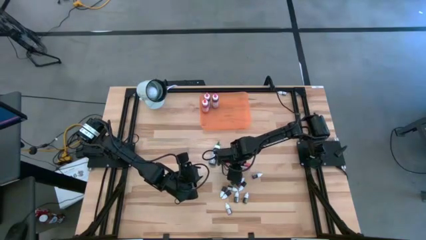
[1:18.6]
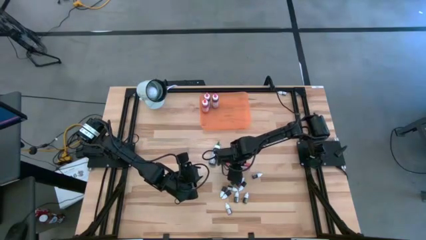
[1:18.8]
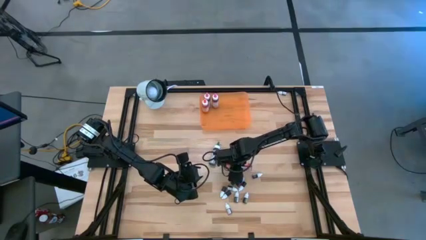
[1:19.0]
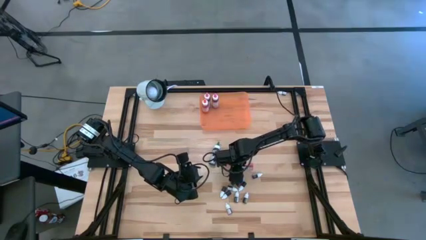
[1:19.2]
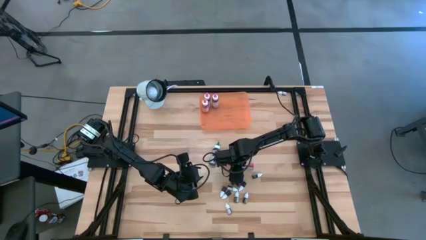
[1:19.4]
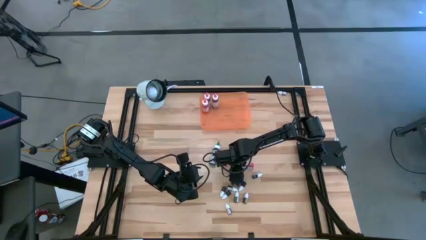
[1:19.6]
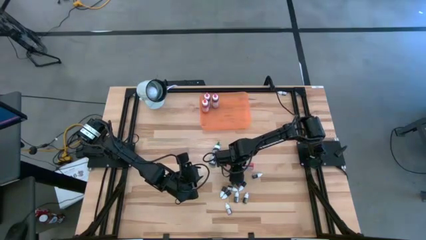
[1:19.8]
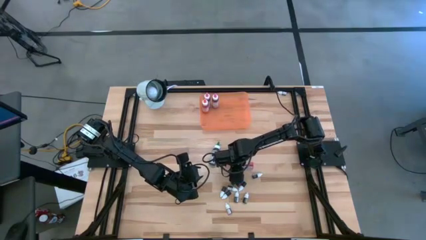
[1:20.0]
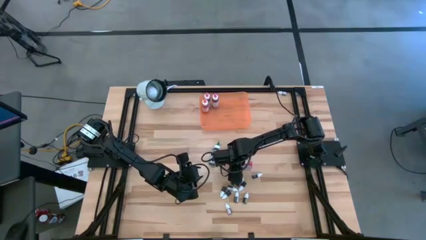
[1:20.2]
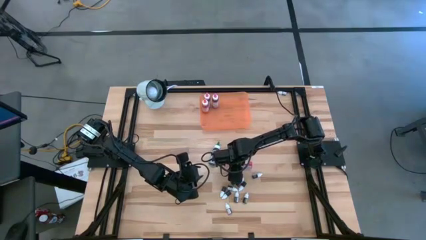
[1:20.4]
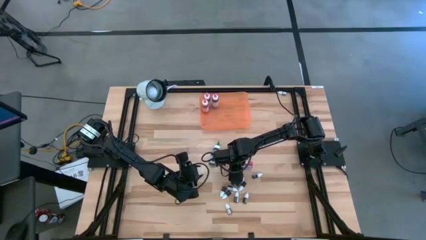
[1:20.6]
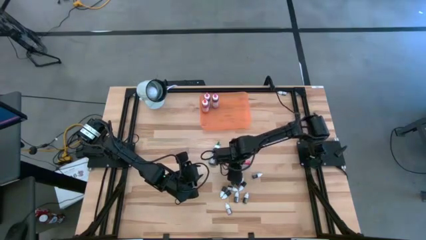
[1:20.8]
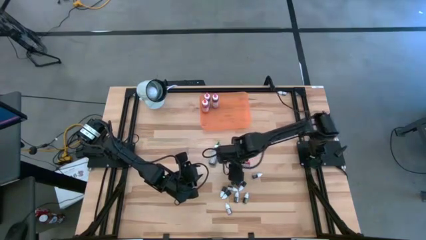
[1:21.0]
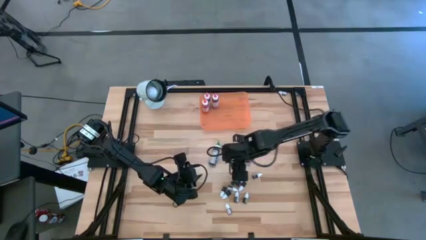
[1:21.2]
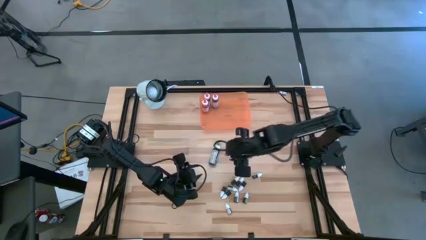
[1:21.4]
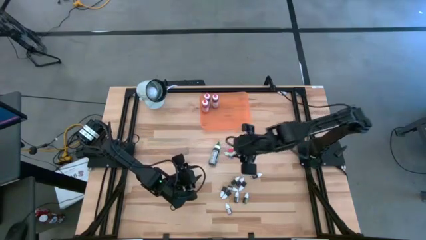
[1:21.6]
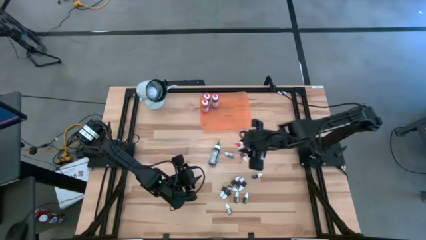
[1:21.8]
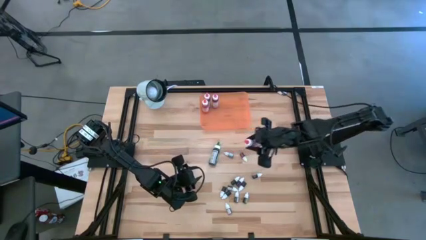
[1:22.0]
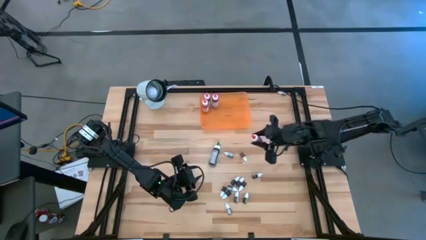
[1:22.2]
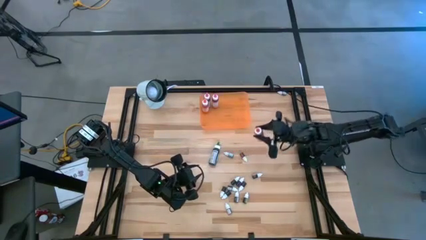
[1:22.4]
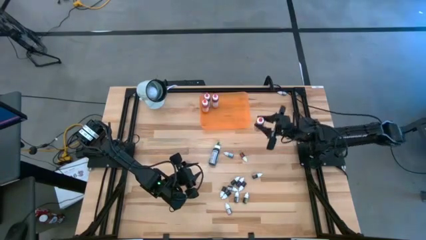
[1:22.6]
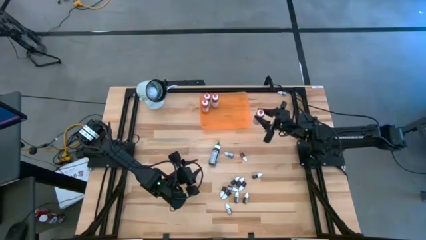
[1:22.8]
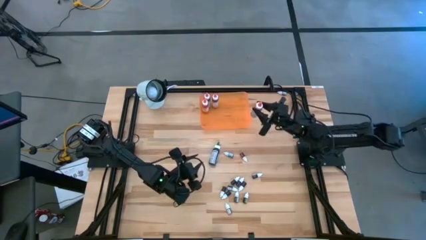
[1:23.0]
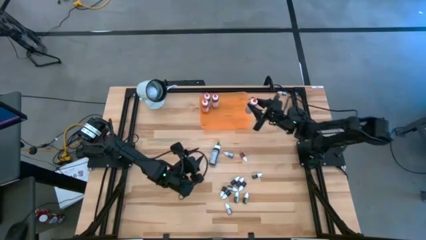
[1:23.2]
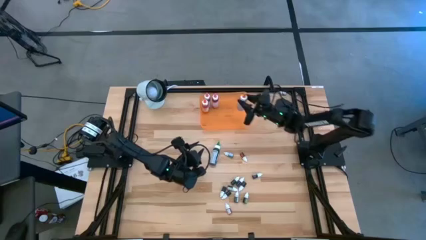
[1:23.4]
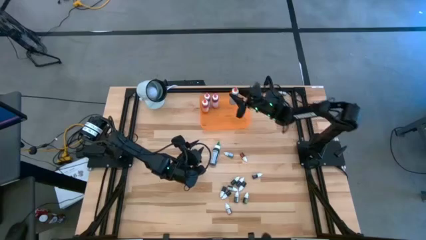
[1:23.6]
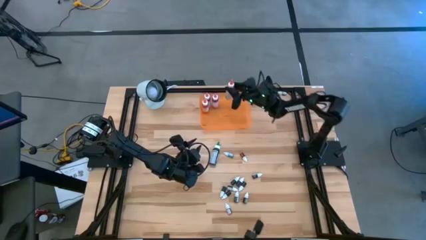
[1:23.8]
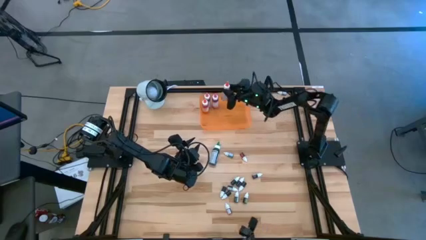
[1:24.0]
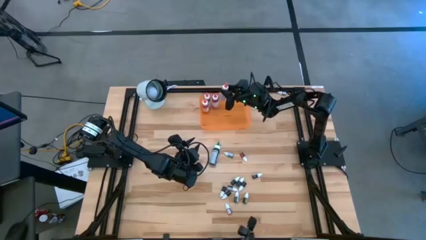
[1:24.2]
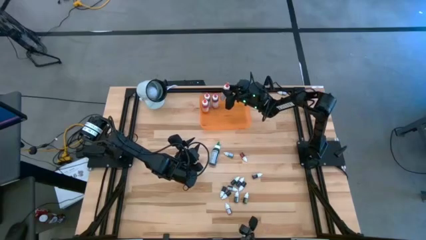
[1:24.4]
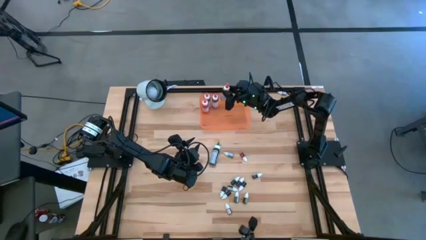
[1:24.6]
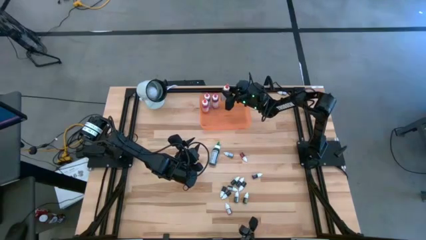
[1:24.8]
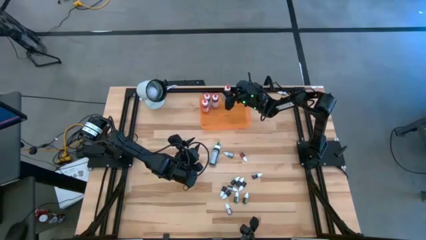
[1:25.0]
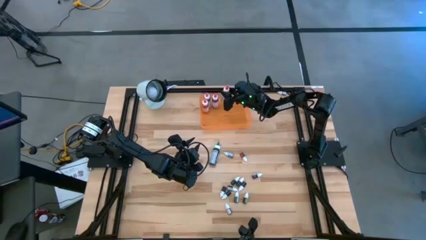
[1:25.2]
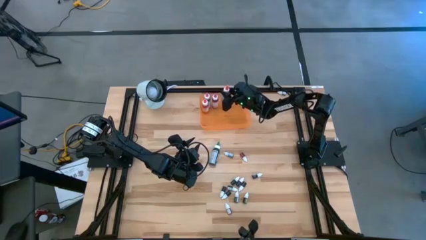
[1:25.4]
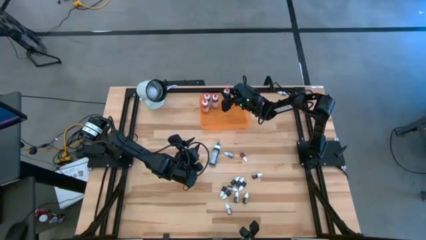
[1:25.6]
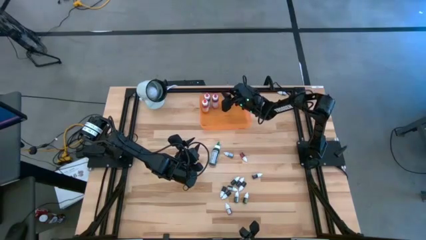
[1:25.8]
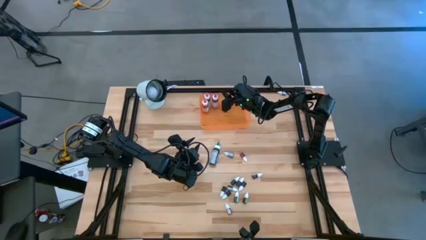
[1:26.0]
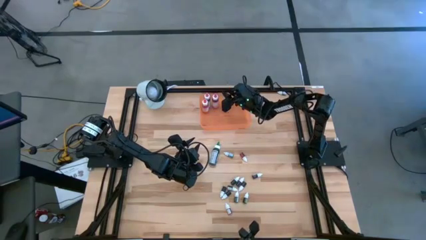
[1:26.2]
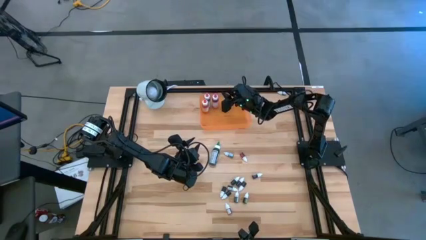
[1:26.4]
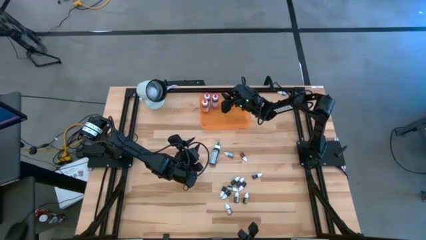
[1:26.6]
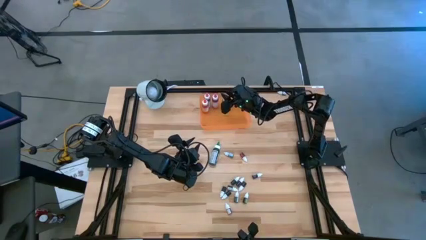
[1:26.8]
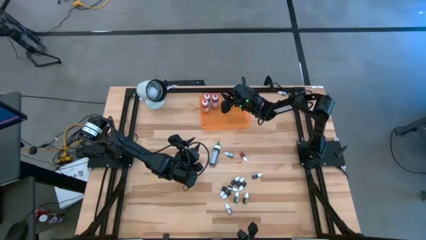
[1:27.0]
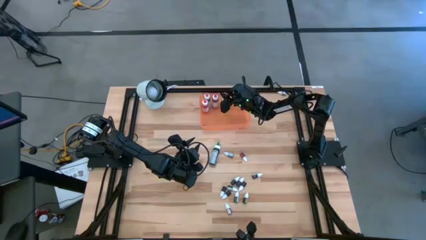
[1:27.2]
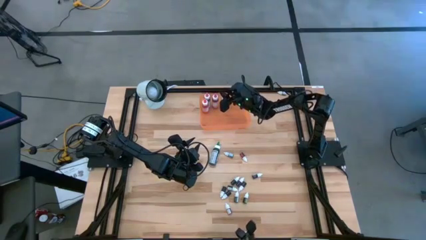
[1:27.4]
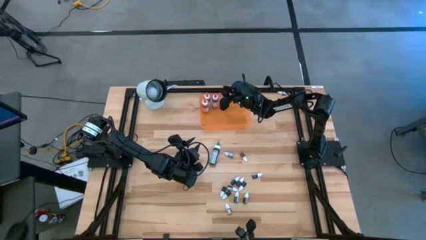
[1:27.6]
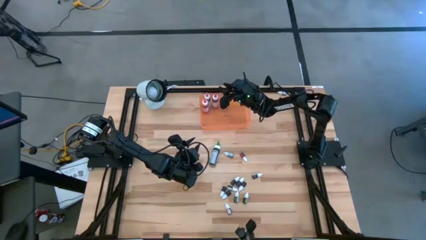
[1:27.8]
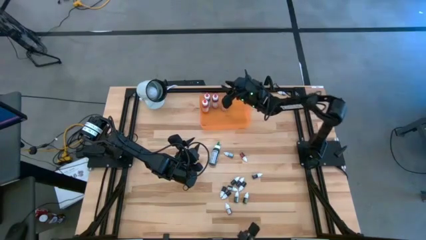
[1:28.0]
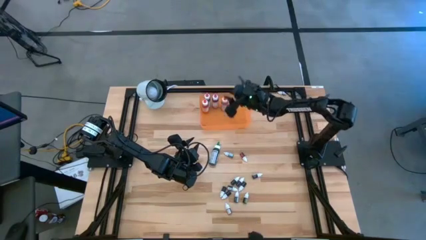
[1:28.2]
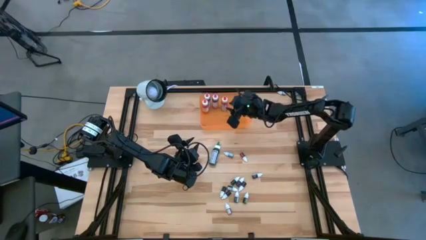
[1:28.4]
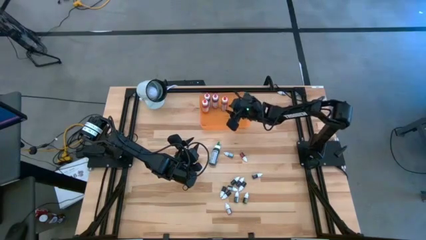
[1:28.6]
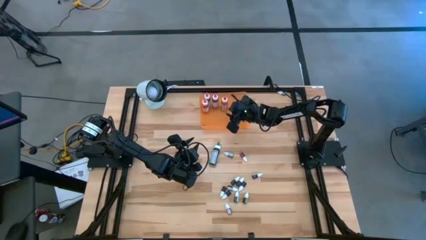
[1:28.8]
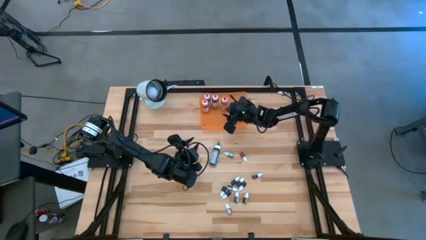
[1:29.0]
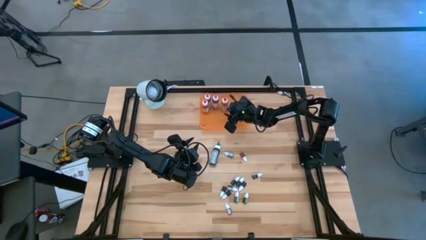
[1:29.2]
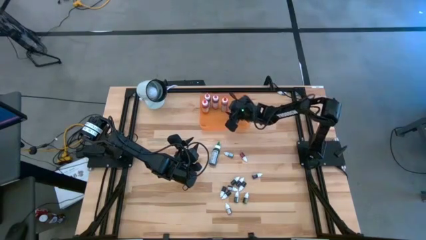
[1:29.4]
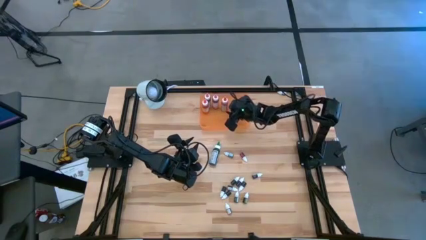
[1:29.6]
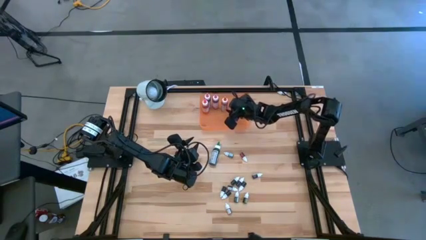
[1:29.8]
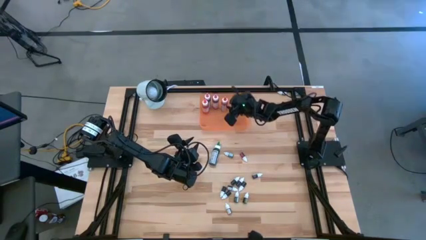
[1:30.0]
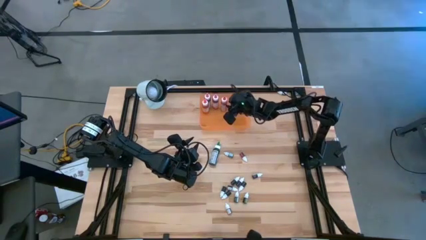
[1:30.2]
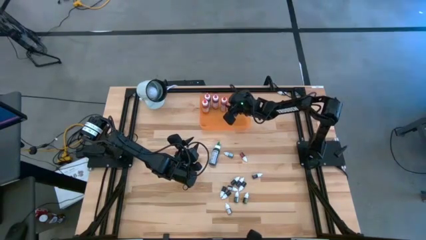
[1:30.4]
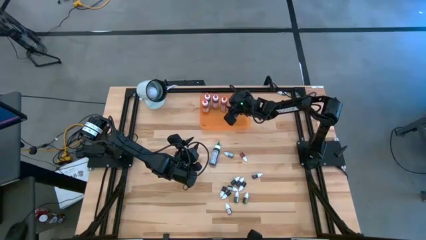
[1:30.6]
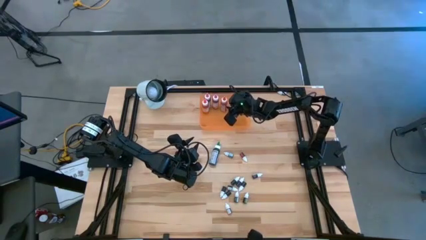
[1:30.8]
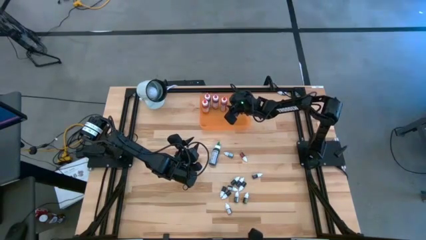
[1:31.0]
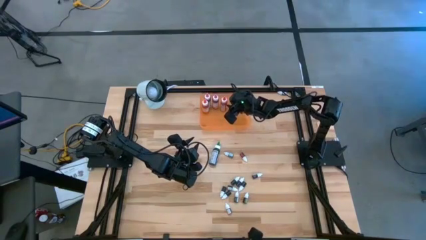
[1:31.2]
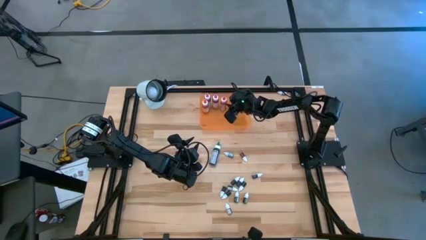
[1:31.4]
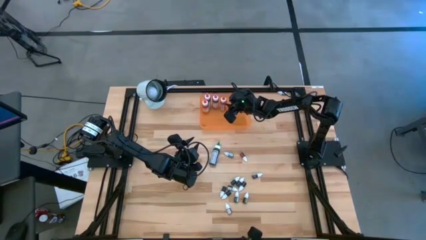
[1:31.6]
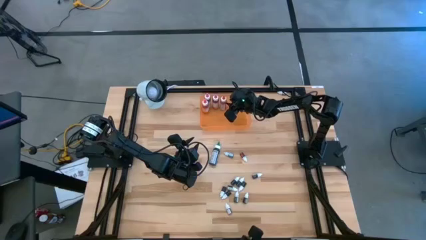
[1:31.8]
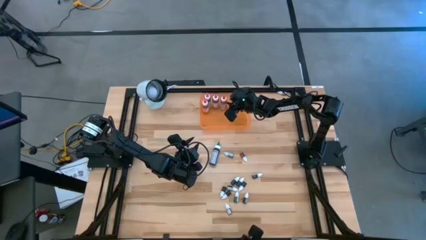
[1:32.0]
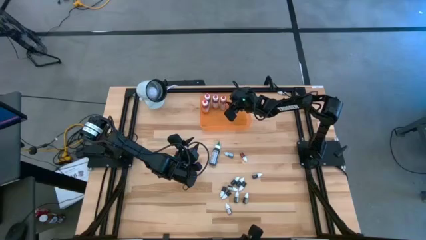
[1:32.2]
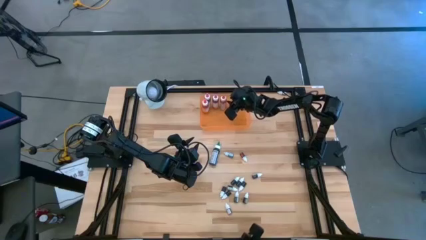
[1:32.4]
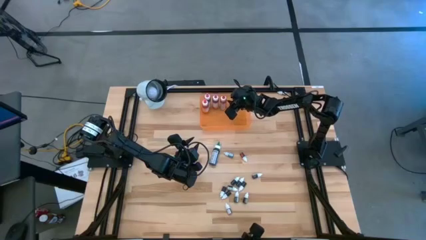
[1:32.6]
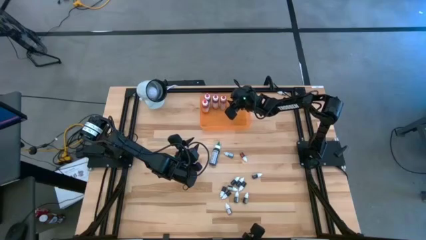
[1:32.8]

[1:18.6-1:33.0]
Task: Pick & Place food coloring
Put the large orange coloring bottle into the orange bin
